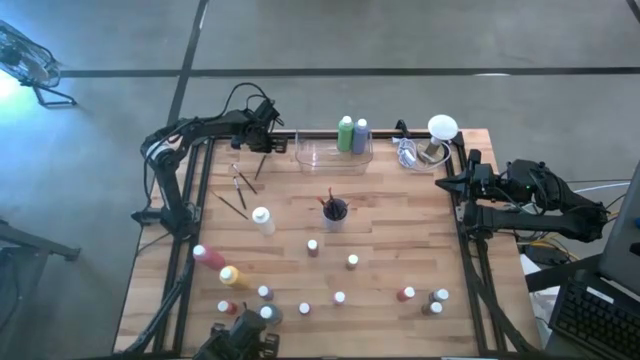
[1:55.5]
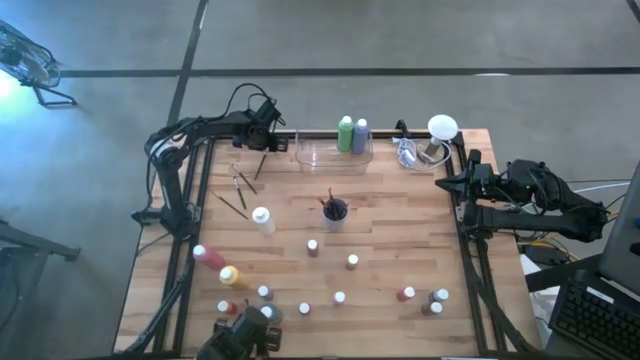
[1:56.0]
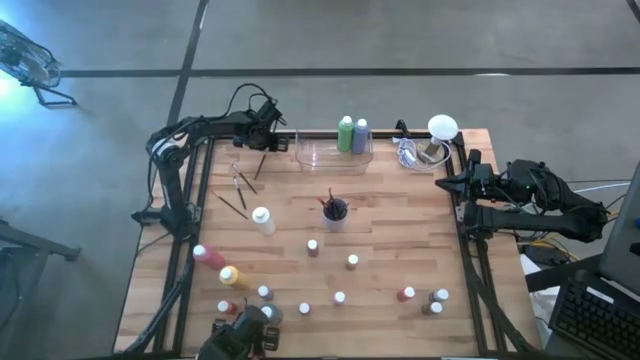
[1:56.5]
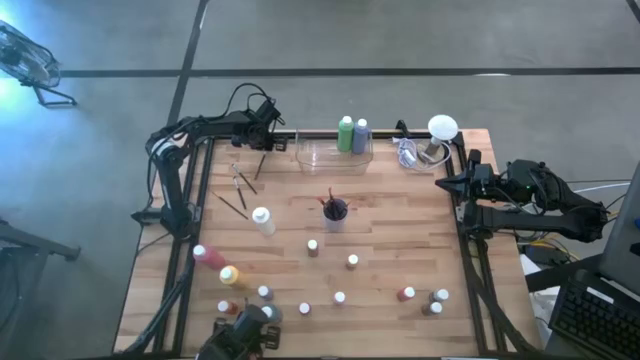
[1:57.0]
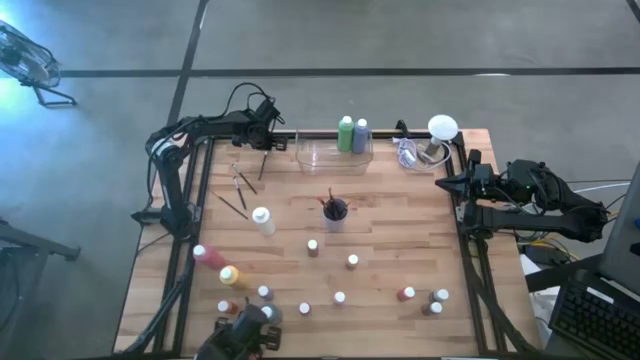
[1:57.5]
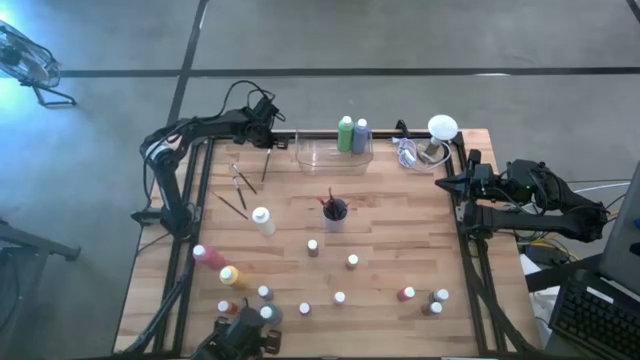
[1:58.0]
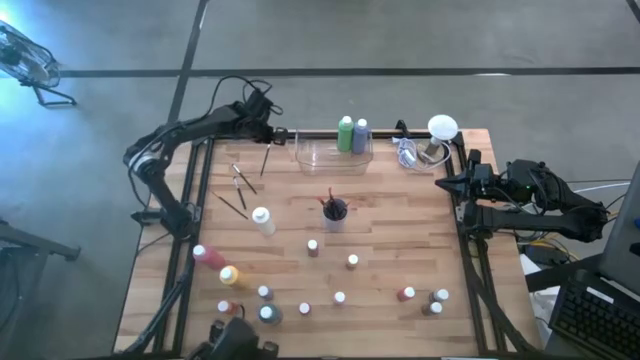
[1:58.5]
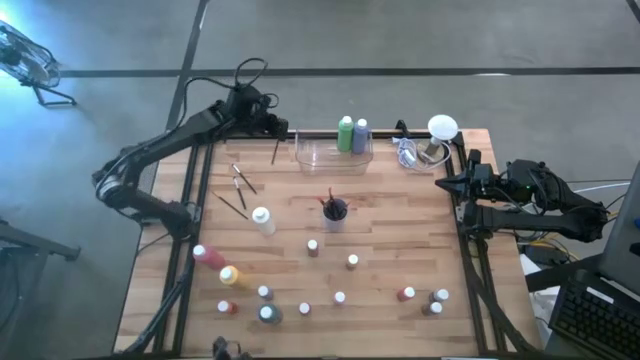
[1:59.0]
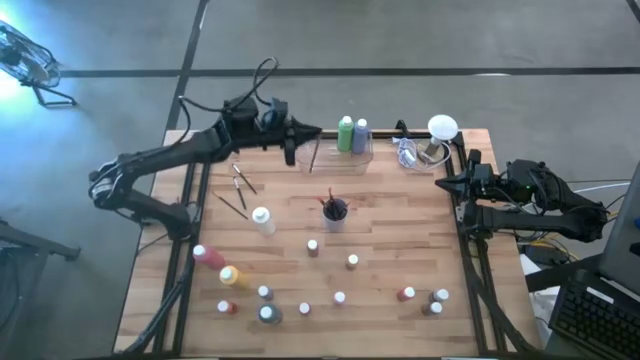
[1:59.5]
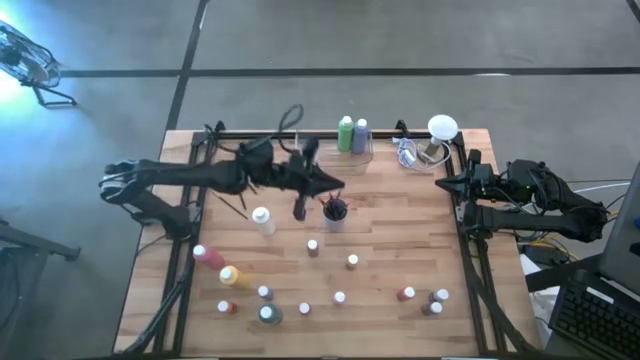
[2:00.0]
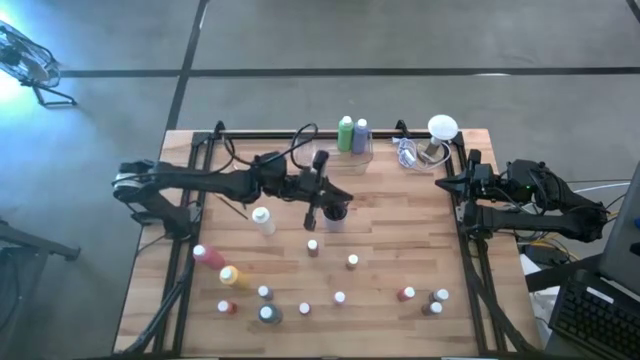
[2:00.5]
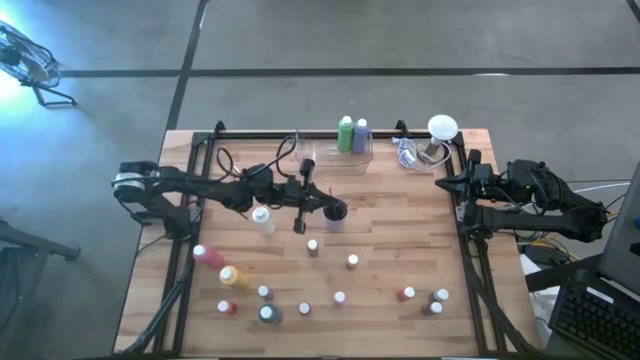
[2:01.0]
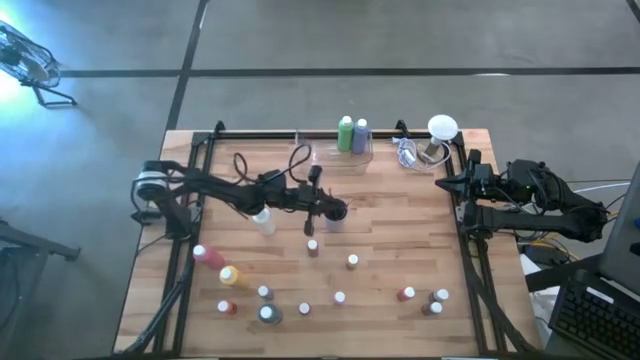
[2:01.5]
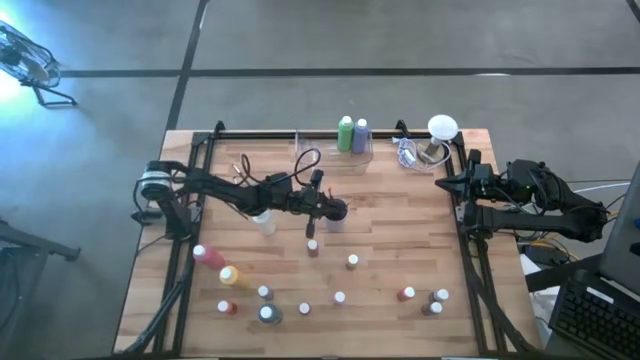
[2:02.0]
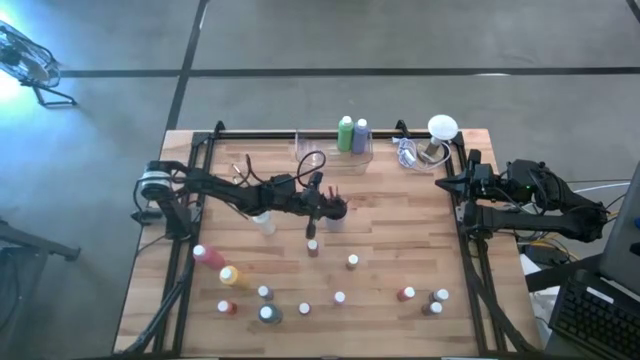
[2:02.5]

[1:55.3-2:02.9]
Task: Pick & Place Paint Supplies
Put the silver paint brush into the purple cup

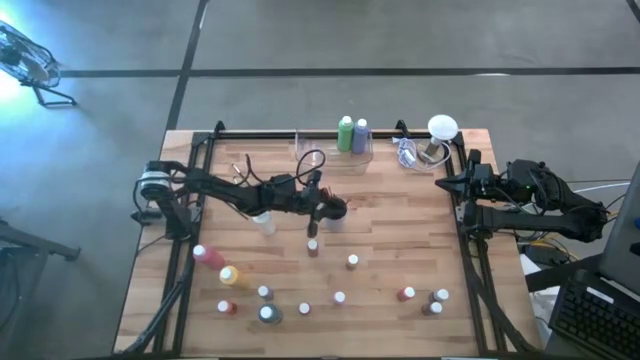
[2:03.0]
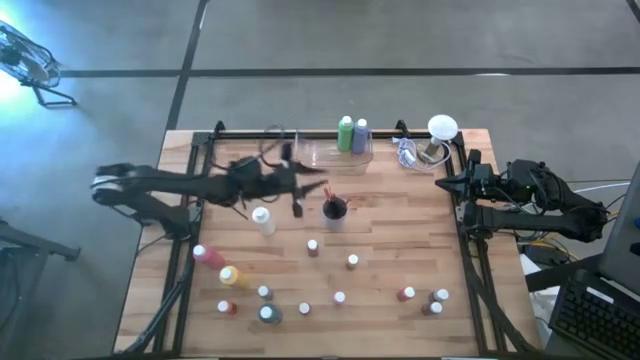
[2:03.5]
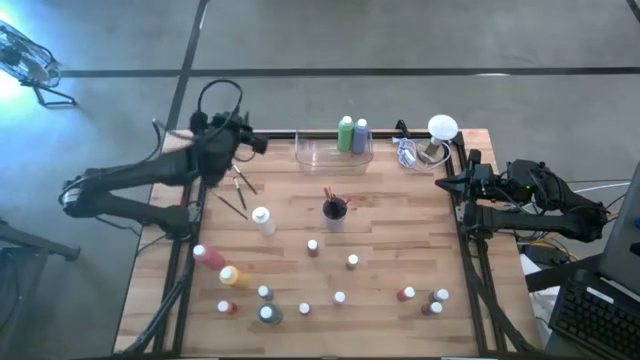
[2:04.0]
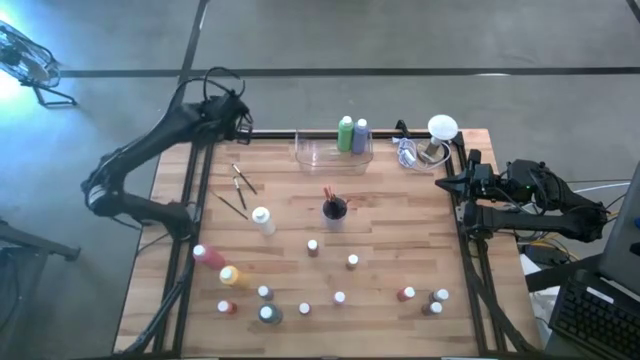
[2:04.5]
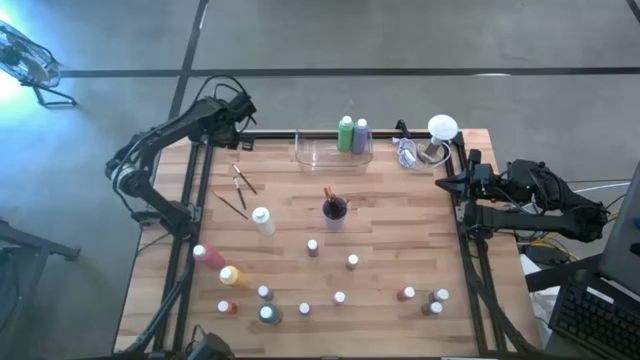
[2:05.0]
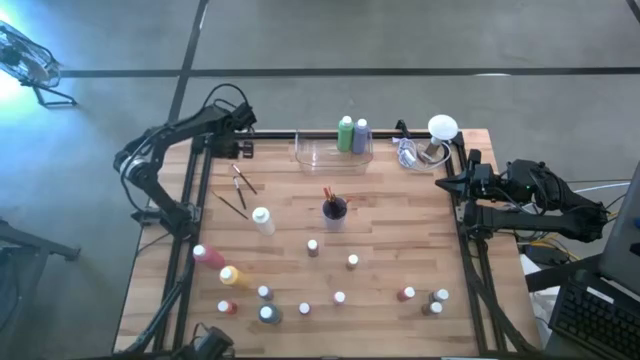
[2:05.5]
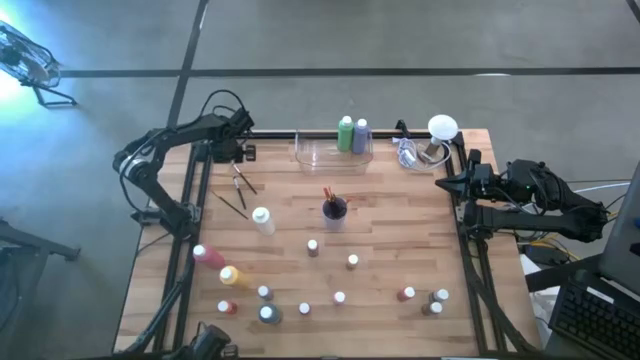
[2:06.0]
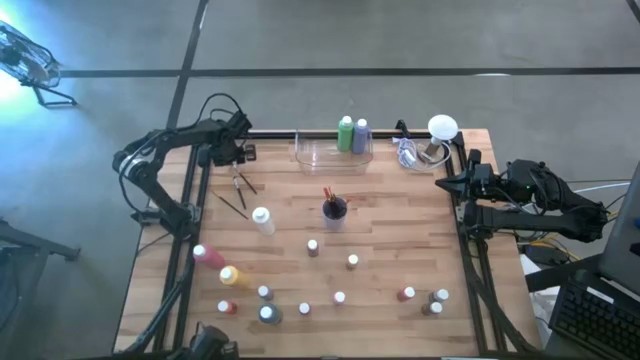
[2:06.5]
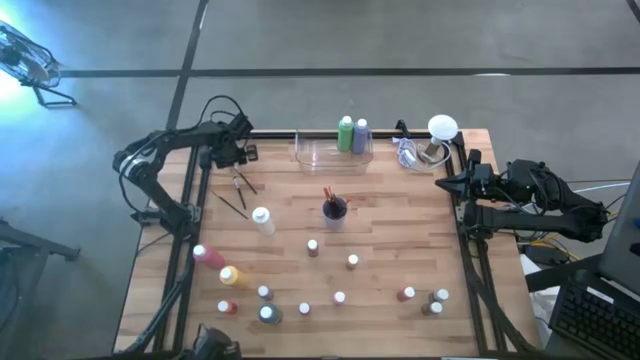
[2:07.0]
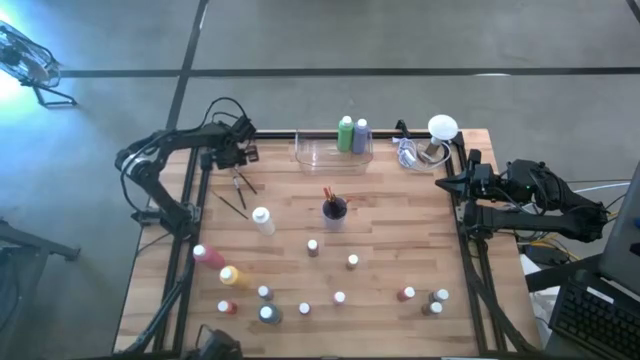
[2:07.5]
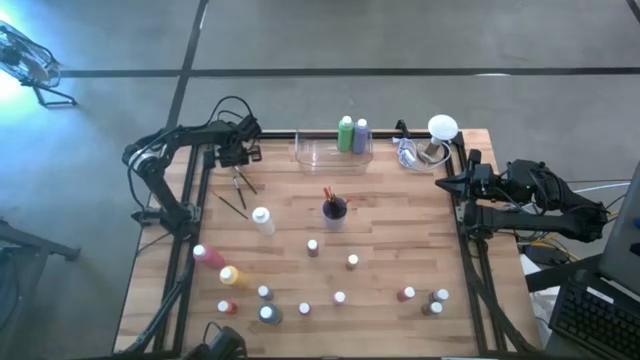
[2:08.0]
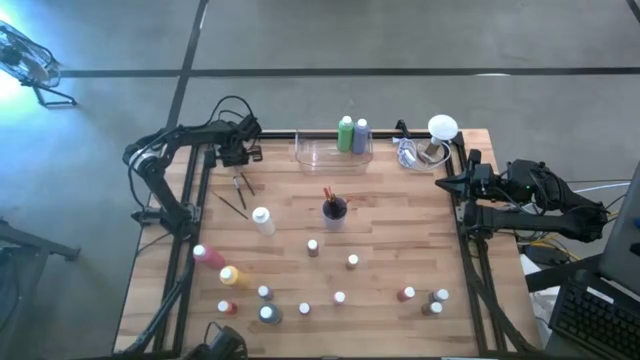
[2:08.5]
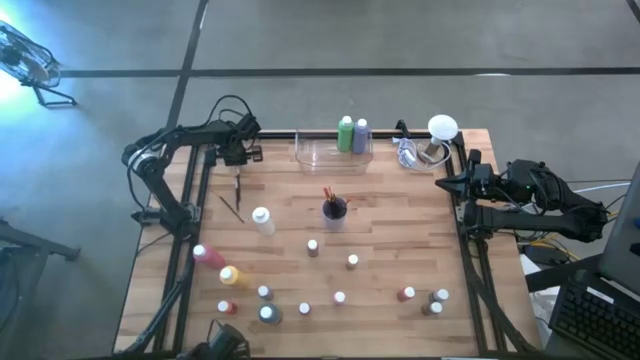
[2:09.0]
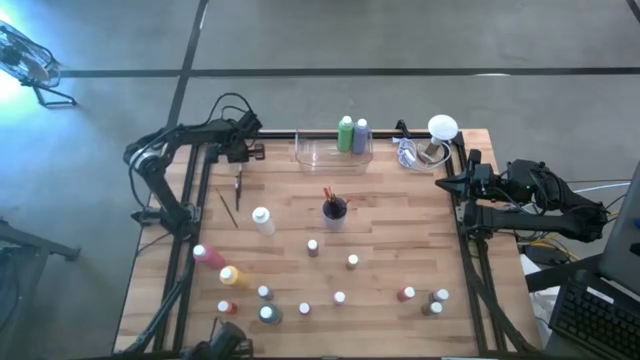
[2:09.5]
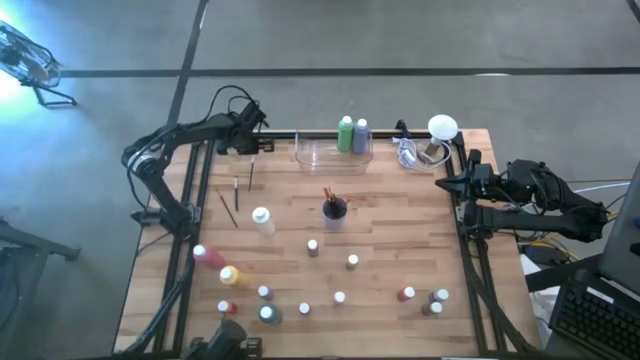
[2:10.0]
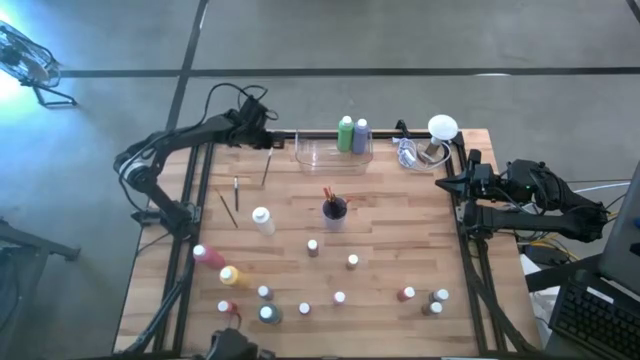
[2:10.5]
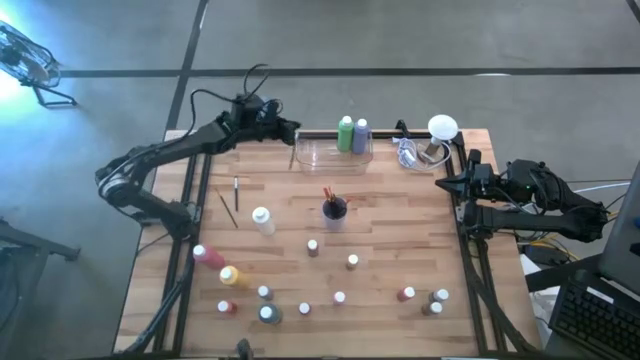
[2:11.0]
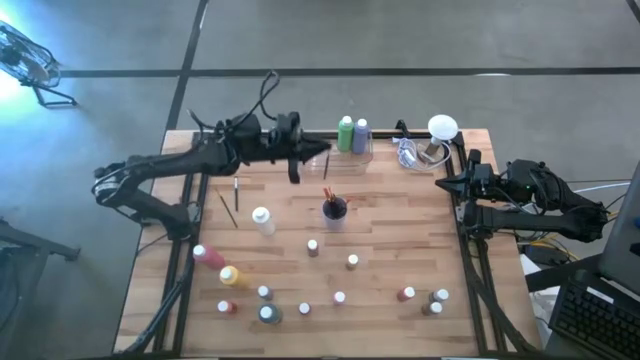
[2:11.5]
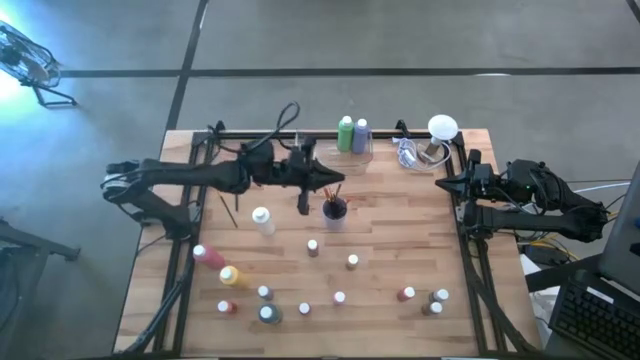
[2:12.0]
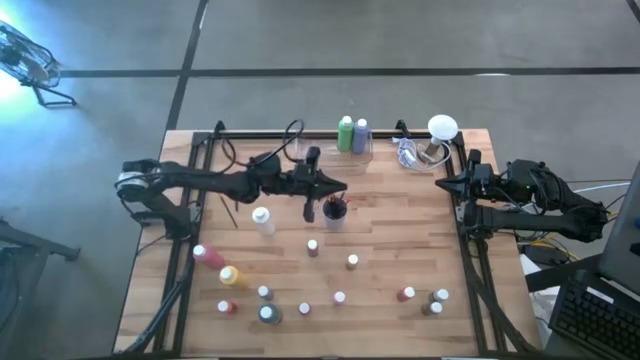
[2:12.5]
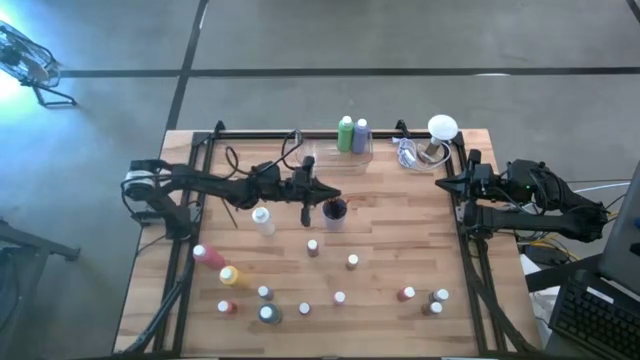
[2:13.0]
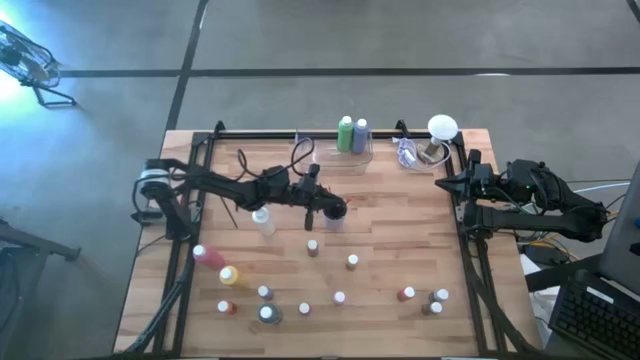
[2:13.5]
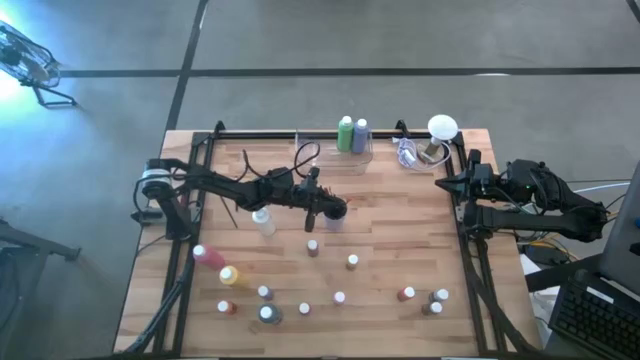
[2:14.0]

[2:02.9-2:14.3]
Put the silver paint brush into the purple cup

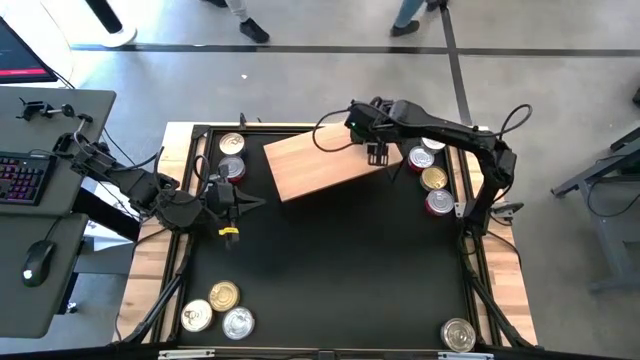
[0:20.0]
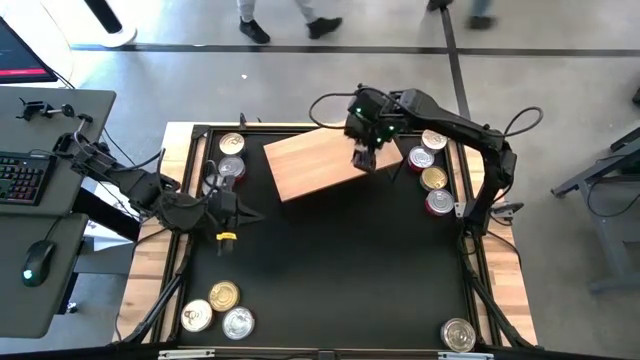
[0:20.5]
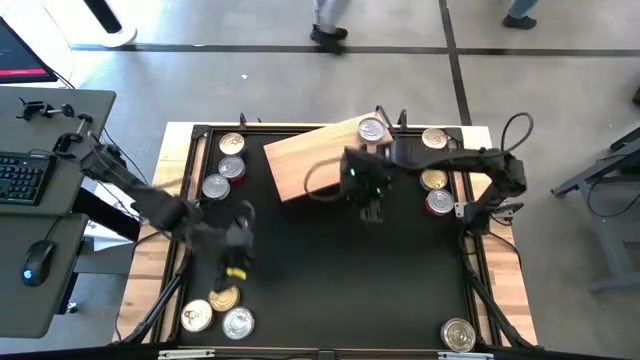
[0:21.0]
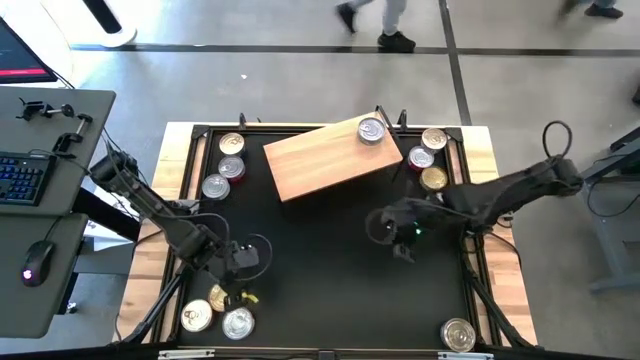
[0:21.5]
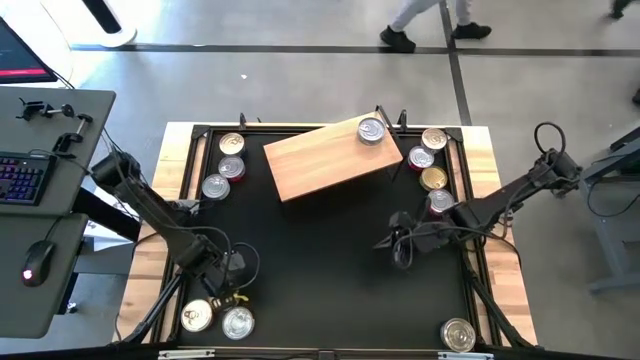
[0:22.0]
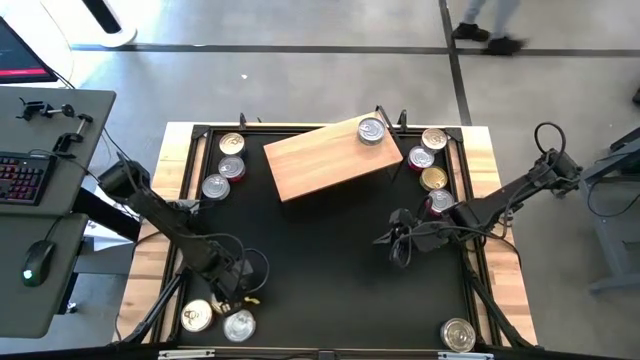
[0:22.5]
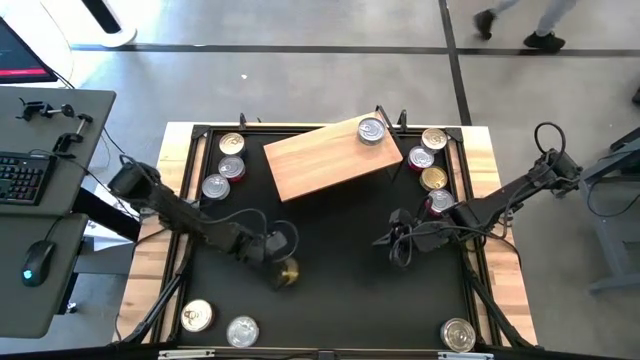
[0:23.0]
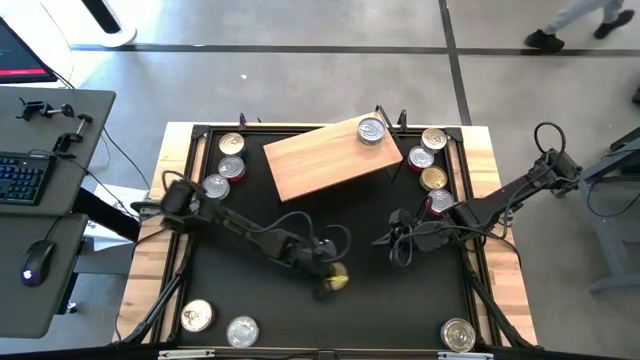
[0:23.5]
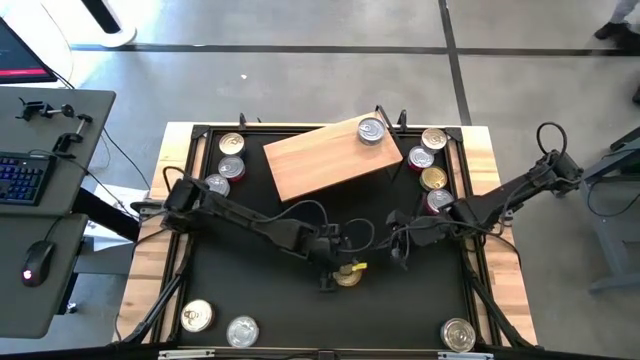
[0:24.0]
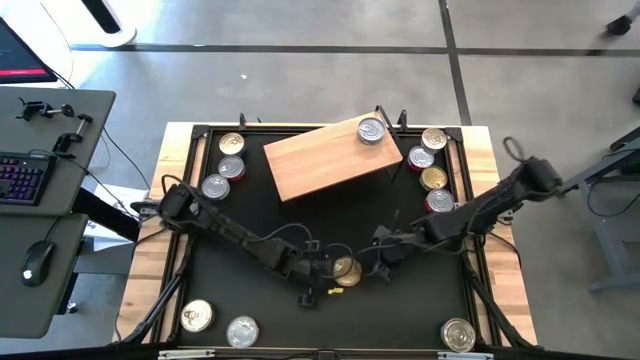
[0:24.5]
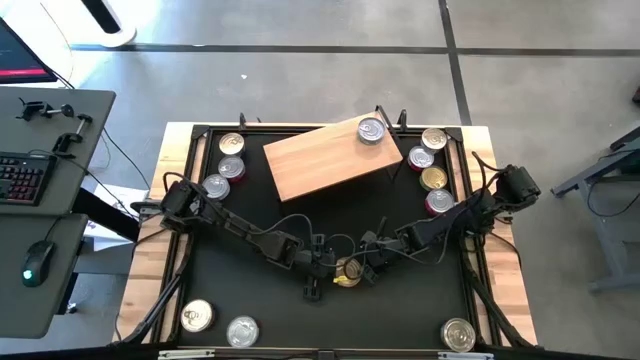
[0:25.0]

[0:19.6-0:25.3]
Task: Stack canned seafood by type on shelf
Put the bottom gold and green tuna can on the shelf
